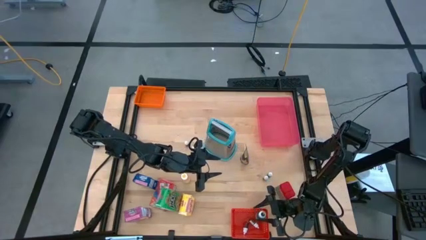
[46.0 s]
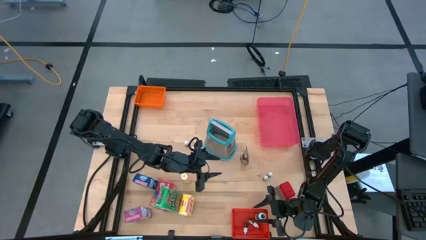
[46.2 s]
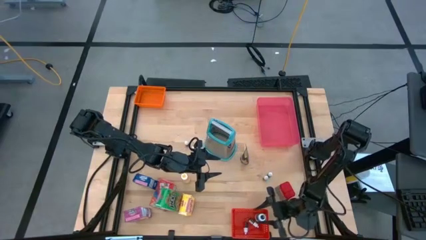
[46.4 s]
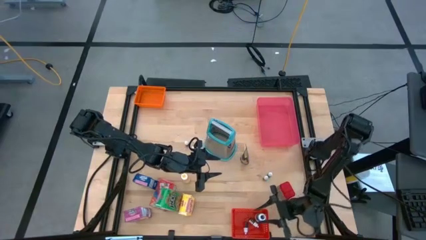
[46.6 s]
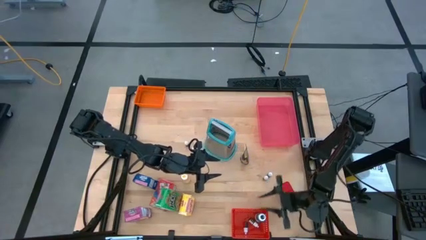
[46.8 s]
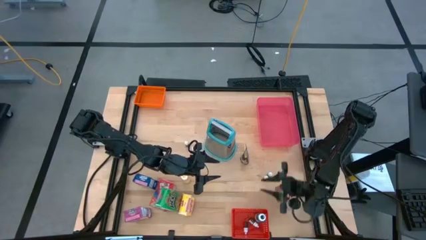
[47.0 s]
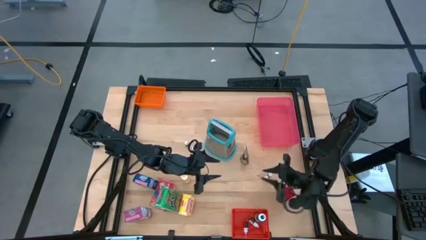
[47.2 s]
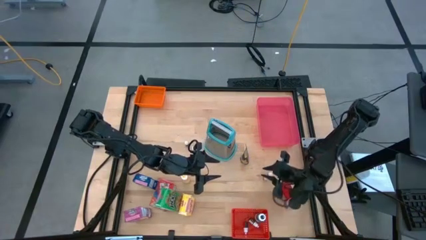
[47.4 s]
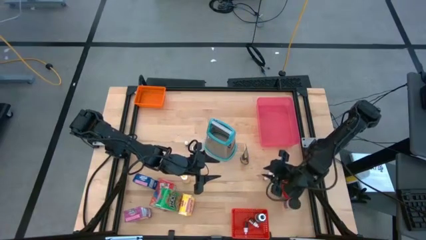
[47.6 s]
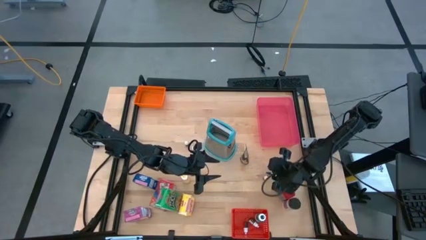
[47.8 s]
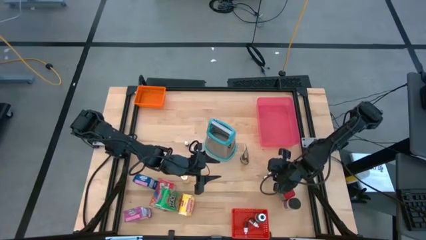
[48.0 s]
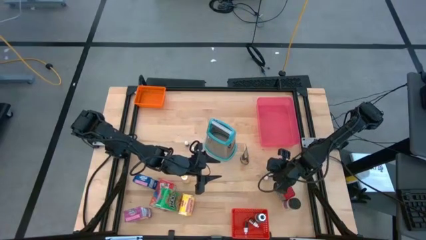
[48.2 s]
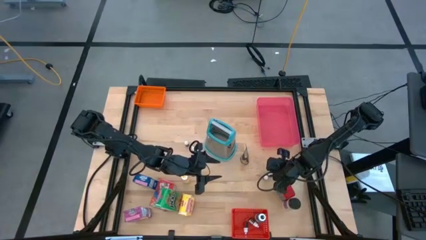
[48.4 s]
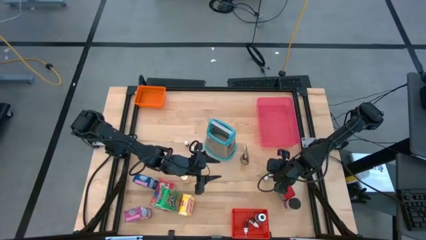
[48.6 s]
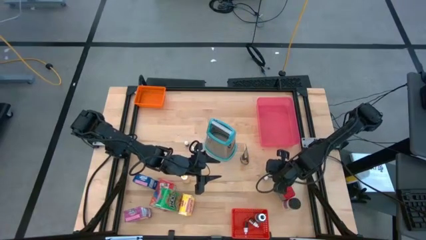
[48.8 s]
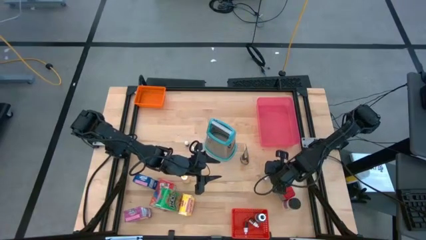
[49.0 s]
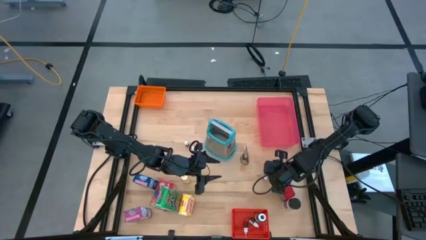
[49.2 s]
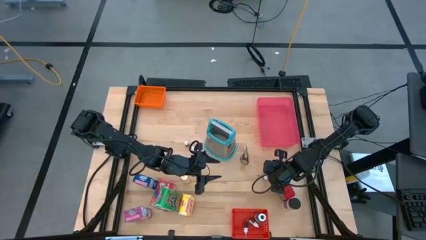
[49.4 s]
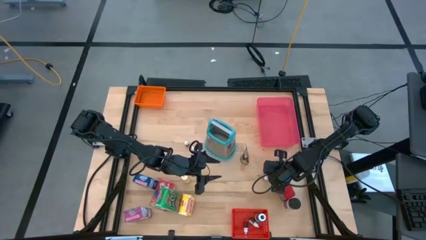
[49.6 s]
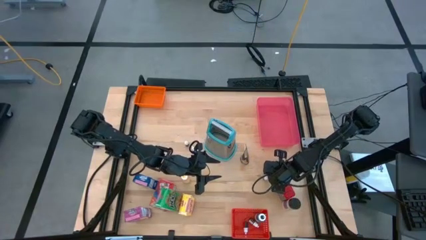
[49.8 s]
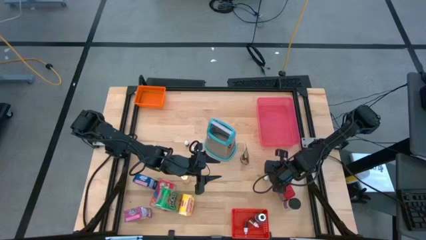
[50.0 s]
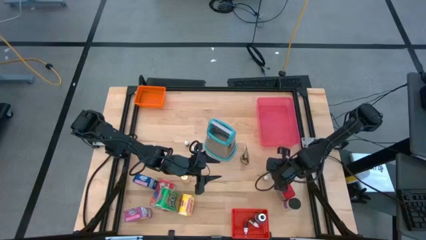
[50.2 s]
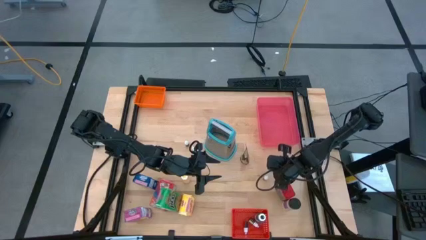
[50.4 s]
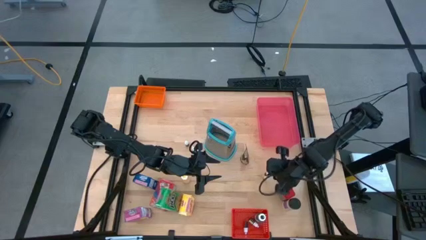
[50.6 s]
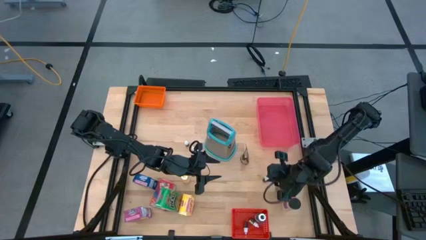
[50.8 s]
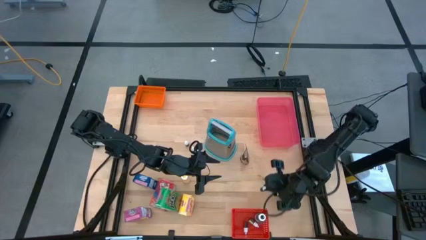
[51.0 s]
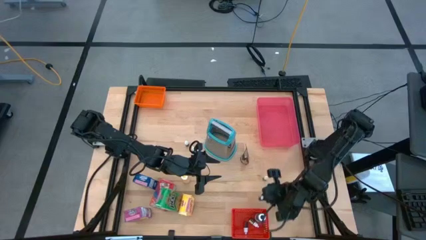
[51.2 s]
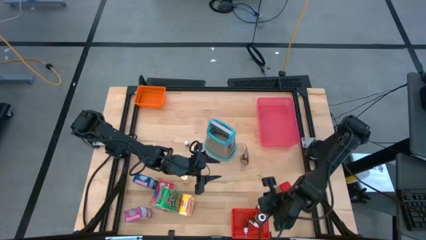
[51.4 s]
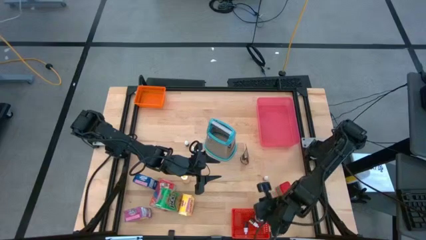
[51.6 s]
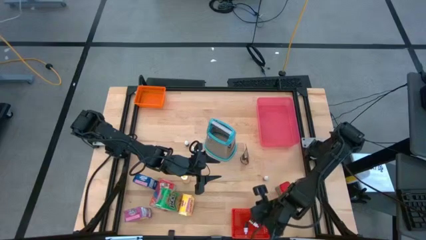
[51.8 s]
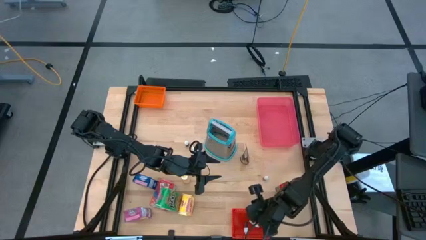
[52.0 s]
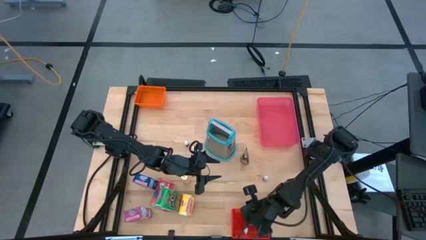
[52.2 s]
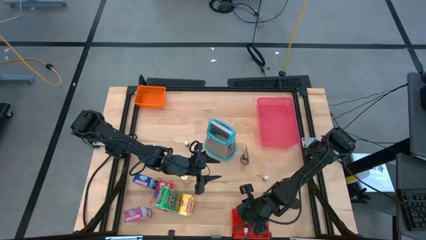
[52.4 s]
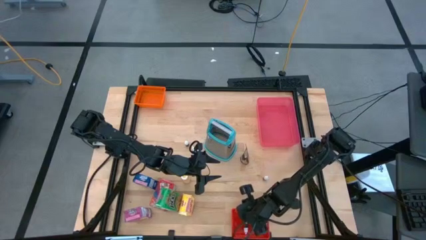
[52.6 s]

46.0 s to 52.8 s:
Task: Pick & Place Kitchen Items
Put the small purple food coloring bottle into the red bin

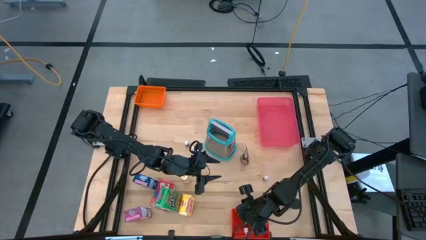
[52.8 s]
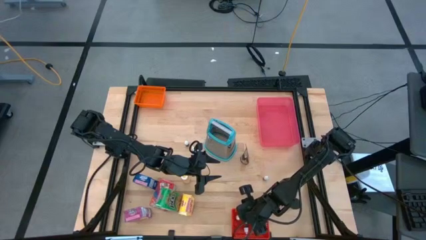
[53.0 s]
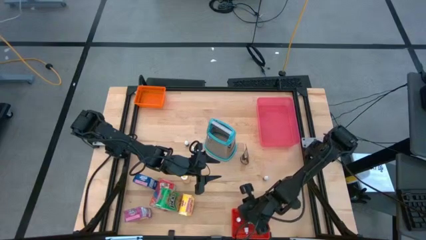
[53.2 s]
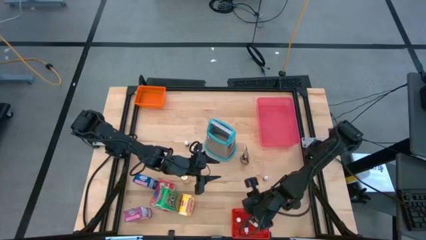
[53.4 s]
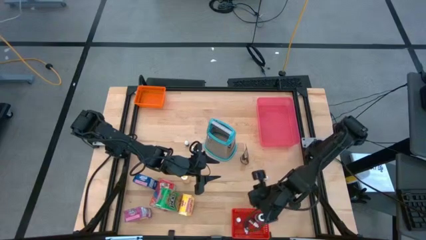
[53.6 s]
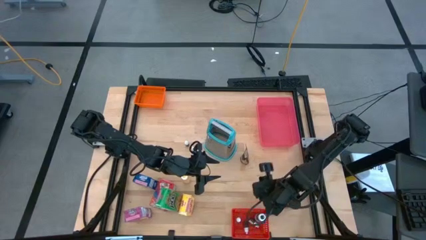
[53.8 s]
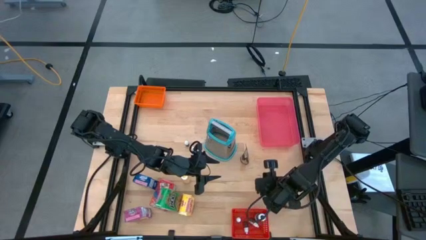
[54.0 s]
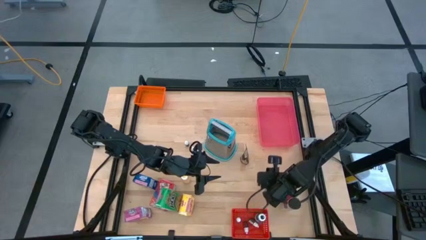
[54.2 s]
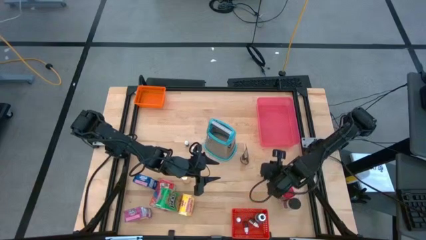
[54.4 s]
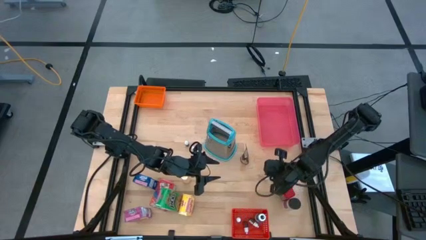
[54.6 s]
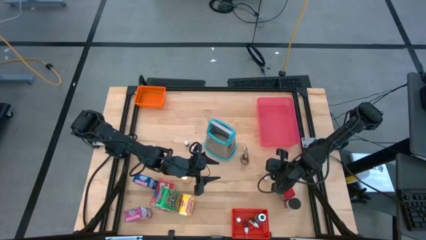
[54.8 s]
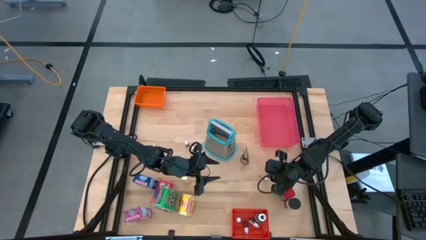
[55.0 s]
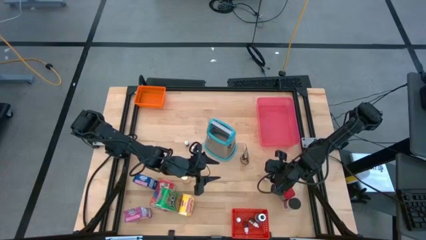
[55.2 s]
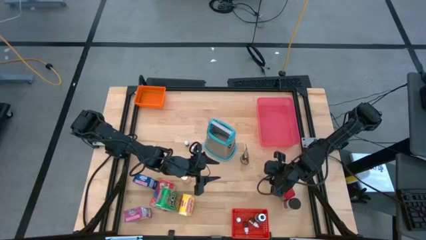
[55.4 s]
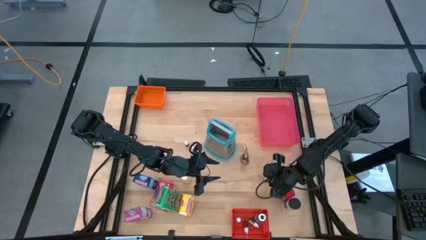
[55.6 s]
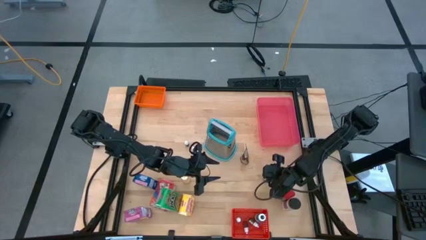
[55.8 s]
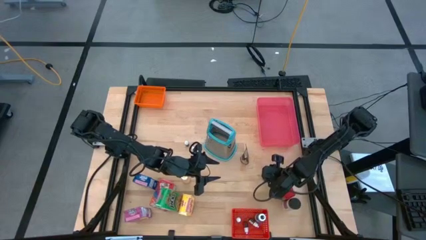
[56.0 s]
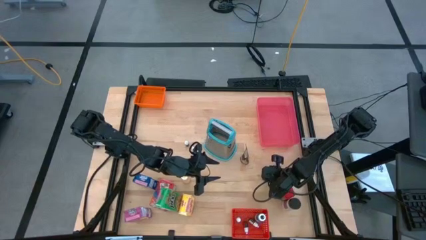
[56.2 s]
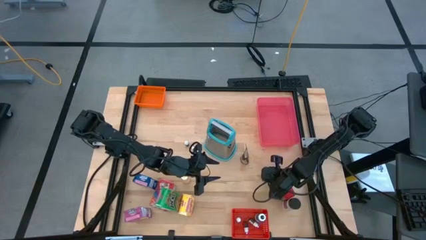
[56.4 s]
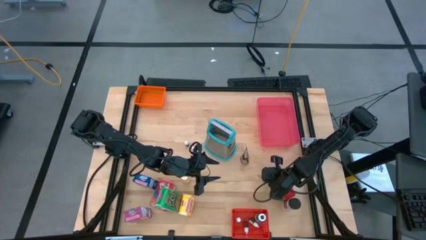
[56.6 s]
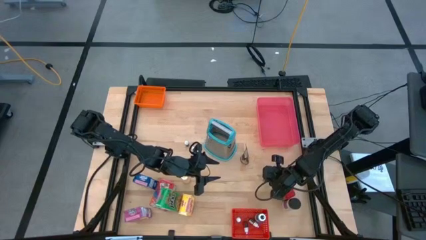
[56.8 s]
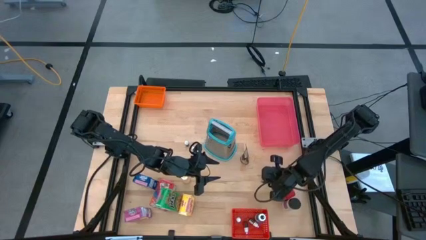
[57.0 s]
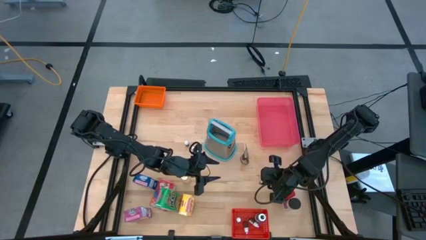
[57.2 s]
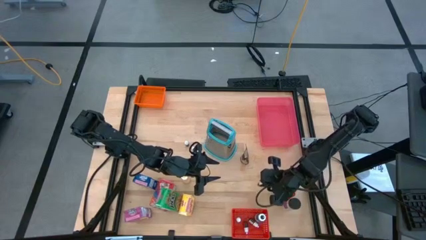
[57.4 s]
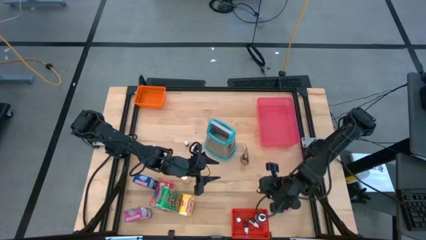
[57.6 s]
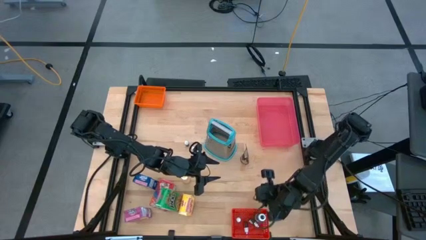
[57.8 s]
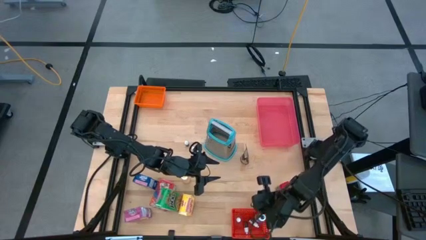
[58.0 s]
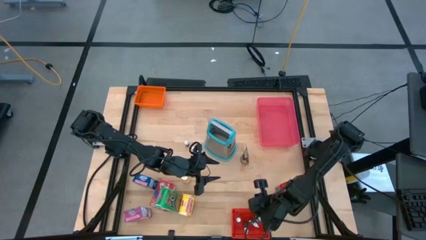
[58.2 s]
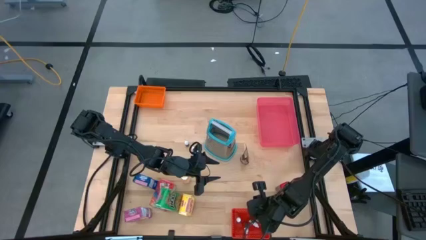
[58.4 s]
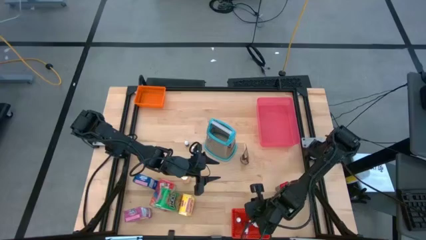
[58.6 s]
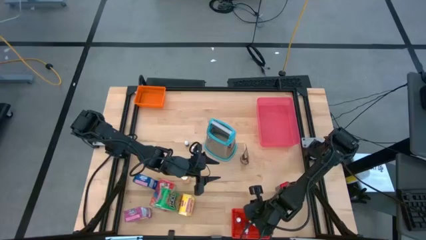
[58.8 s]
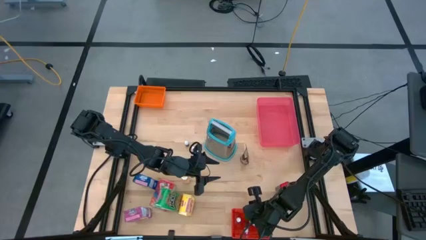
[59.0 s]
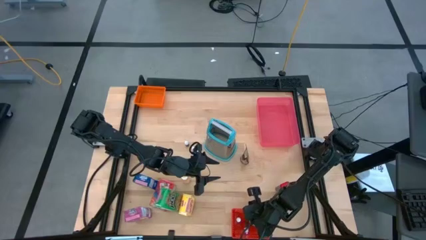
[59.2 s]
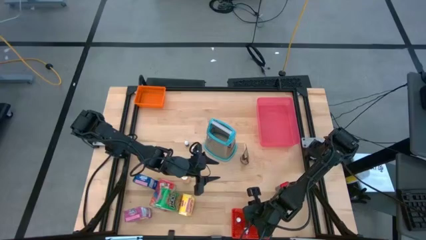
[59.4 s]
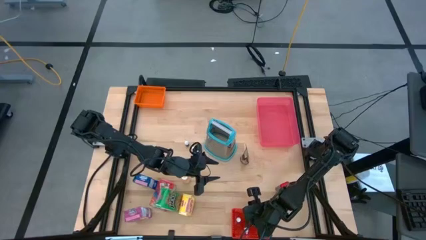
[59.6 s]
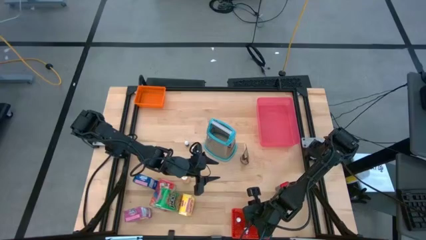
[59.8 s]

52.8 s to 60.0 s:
Put the small yellow food coloring bottle into the red bin
